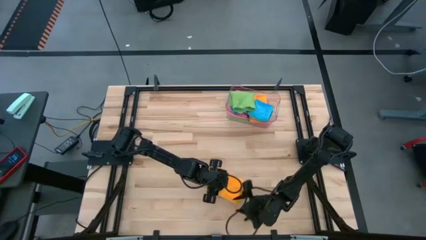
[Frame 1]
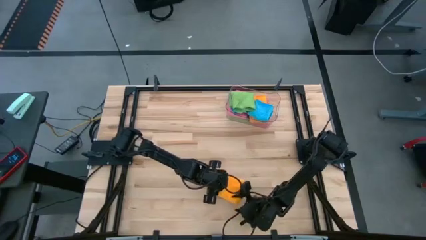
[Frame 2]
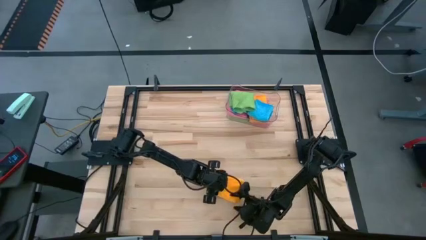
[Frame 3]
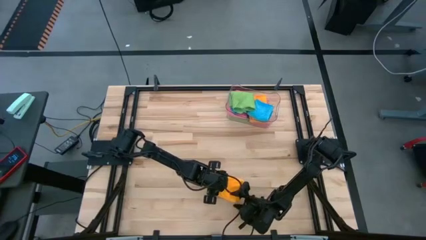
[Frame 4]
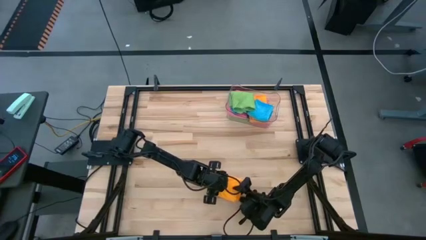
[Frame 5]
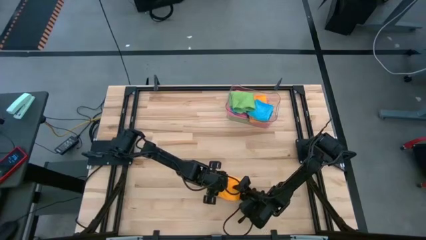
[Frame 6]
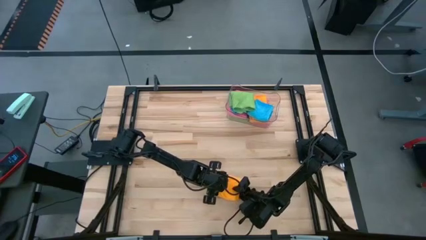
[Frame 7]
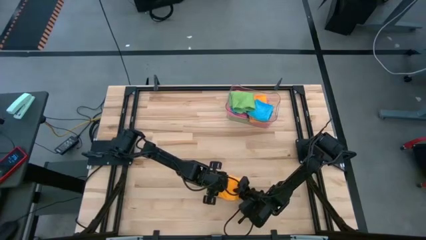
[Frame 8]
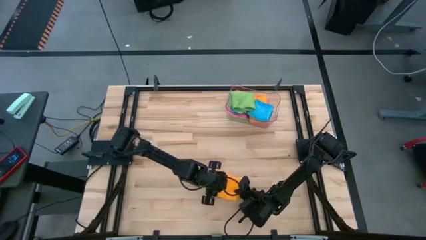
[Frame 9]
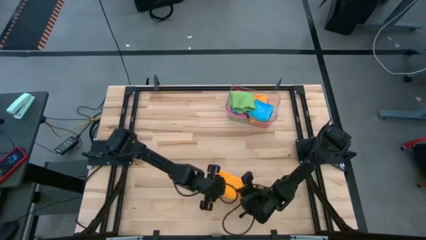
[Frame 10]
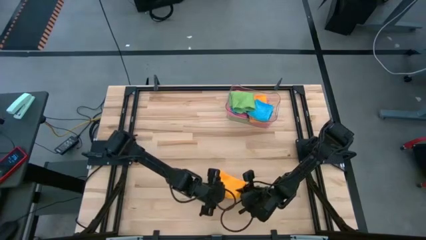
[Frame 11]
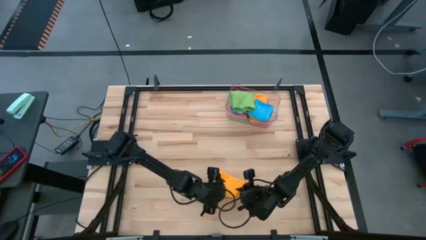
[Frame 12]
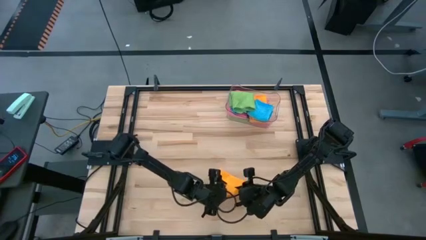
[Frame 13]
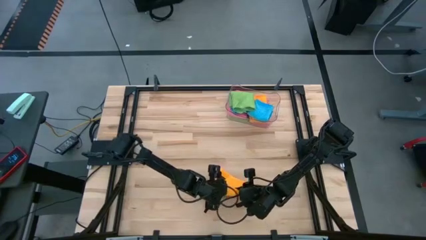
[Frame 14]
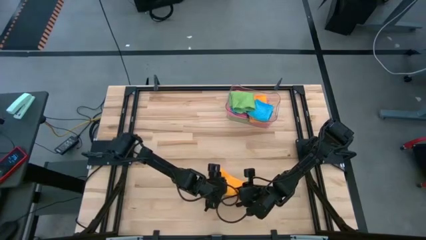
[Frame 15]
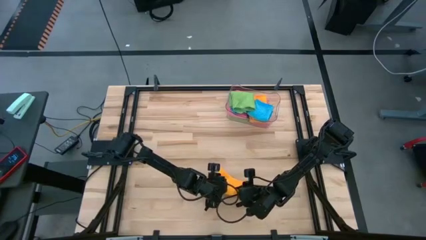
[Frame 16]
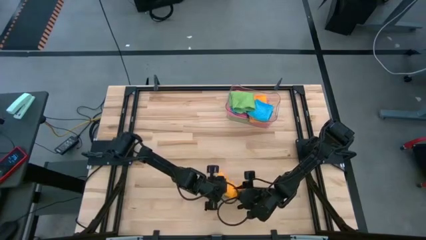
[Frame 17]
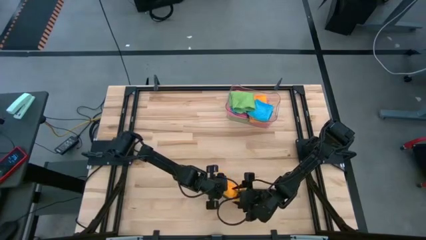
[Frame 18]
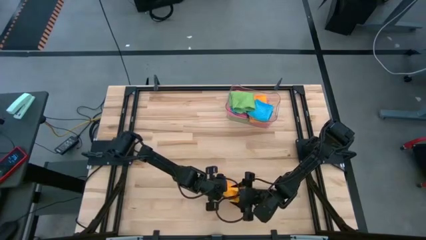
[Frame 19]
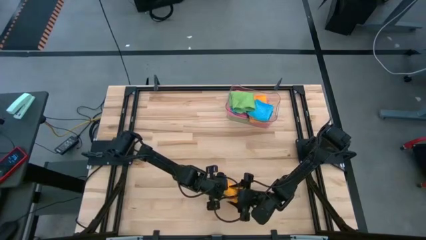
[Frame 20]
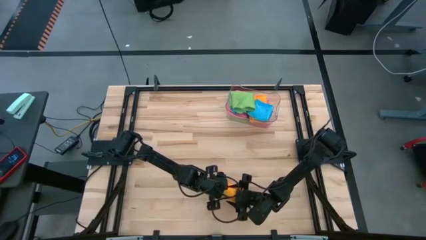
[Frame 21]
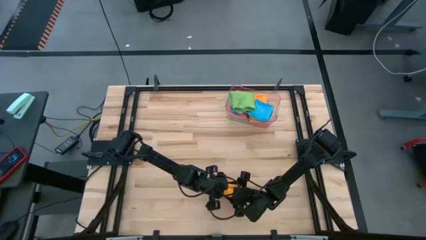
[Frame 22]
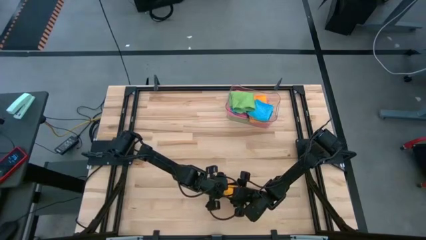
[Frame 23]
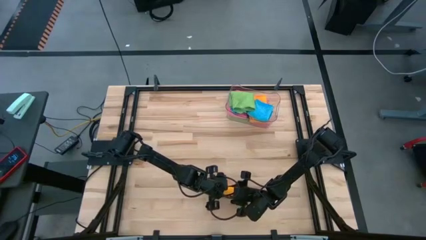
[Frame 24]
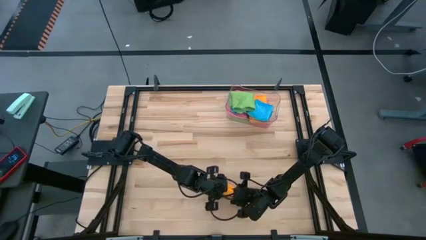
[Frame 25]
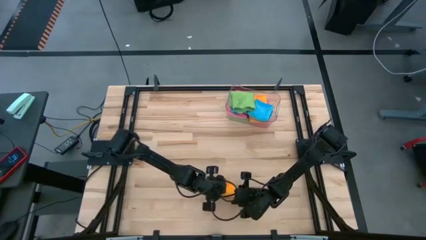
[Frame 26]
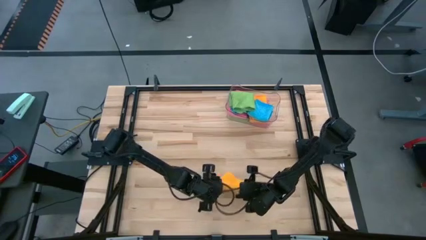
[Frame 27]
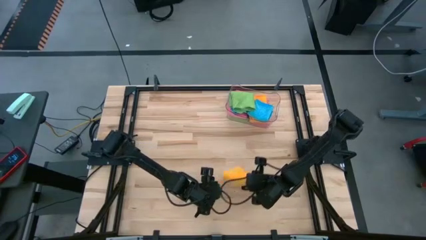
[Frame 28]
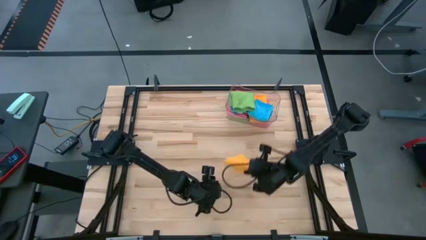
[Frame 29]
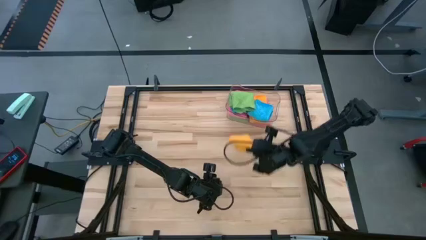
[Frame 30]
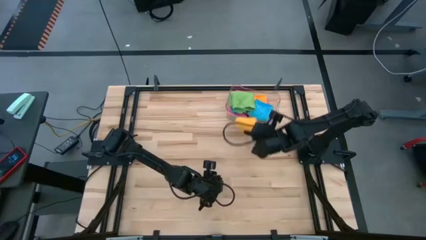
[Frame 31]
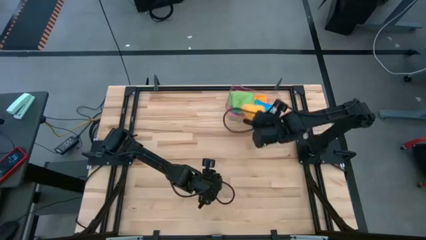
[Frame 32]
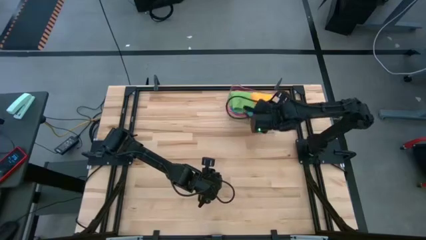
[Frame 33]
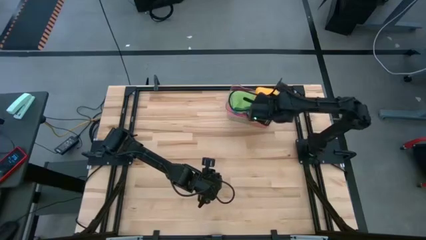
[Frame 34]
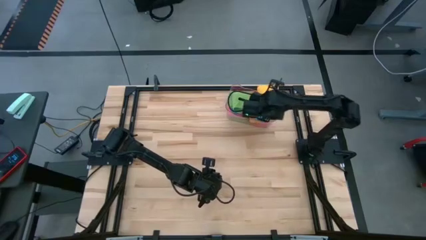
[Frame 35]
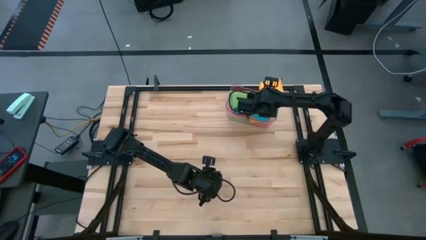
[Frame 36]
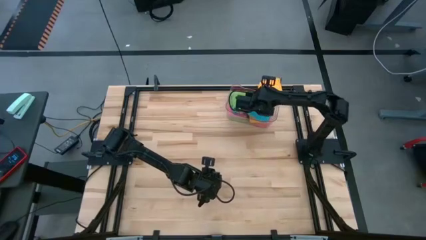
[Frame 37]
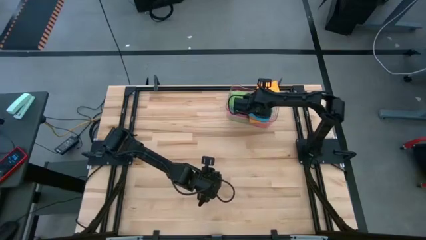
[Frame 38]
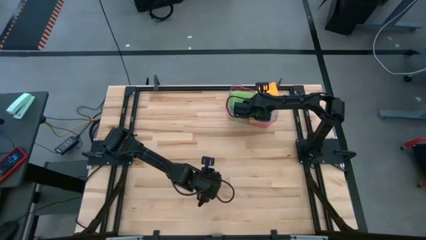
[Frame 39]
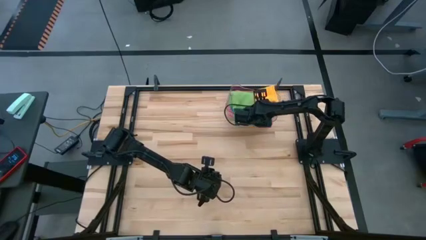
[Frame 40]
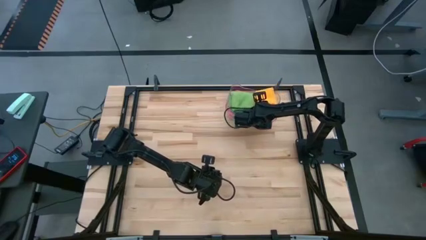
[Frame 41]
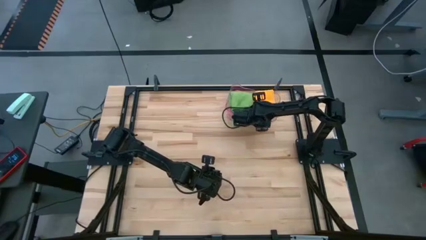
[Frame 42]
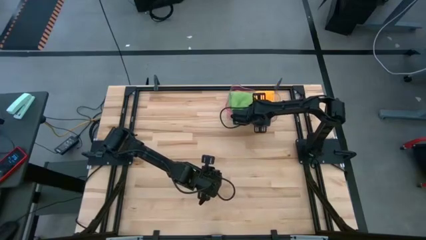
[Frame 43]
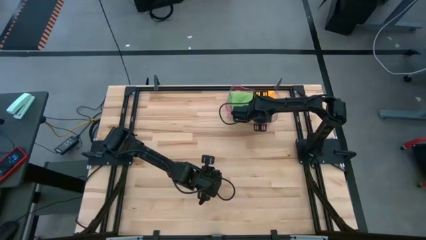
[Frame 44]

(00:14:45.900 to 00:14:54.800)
Task: Fold microfiber towels
Stack the yellow towel on top of the blue towel

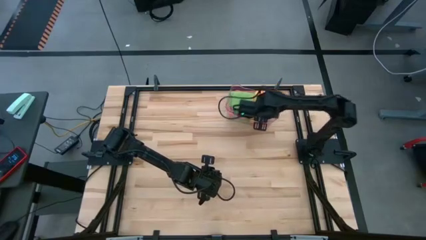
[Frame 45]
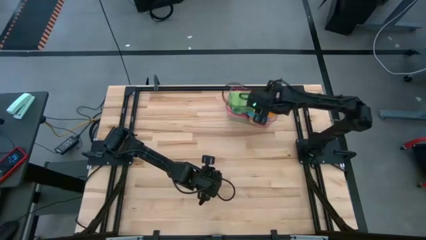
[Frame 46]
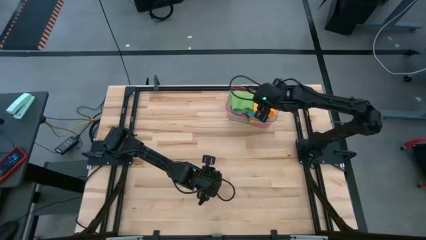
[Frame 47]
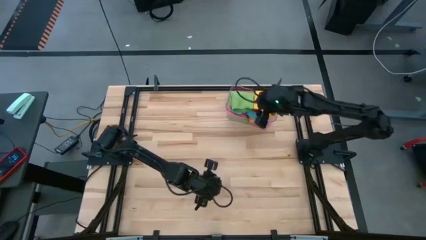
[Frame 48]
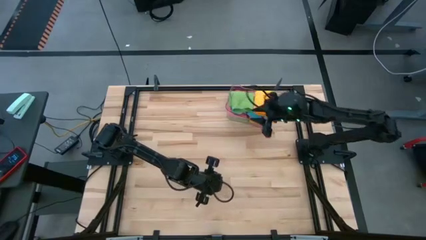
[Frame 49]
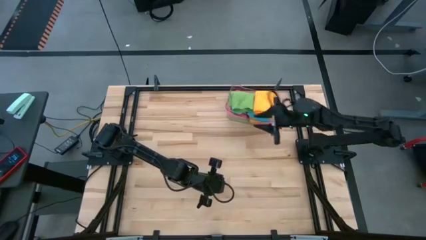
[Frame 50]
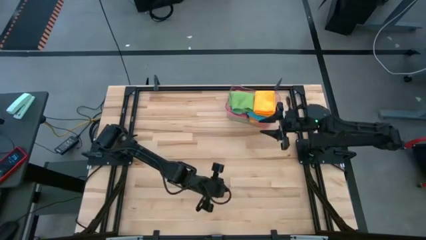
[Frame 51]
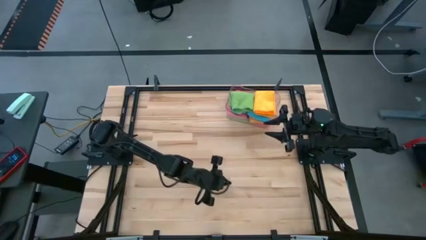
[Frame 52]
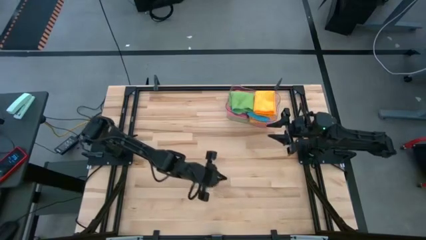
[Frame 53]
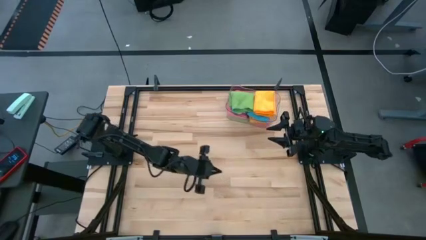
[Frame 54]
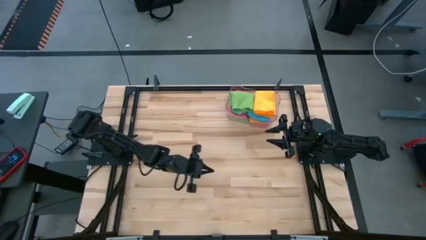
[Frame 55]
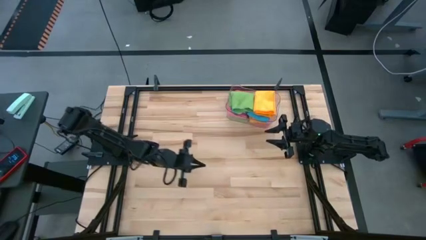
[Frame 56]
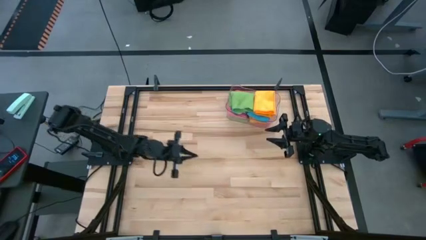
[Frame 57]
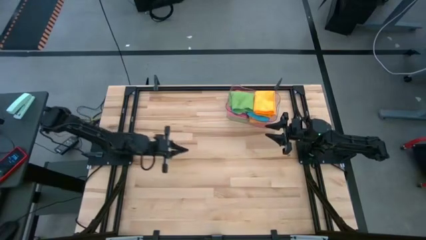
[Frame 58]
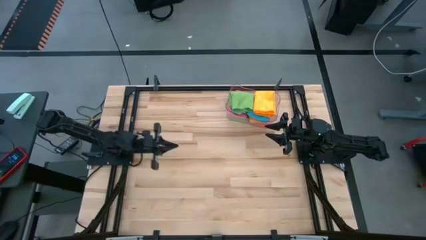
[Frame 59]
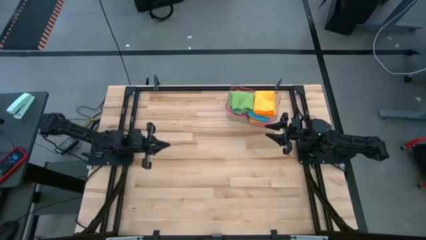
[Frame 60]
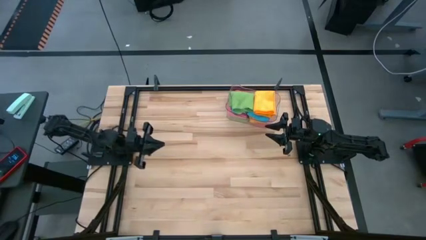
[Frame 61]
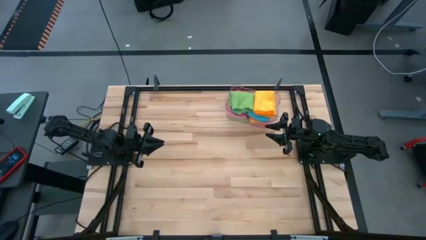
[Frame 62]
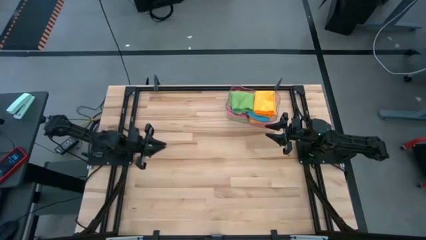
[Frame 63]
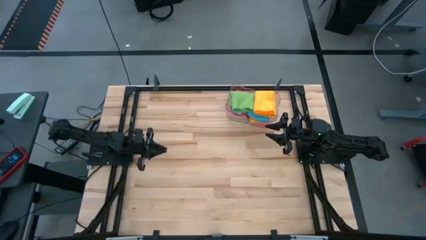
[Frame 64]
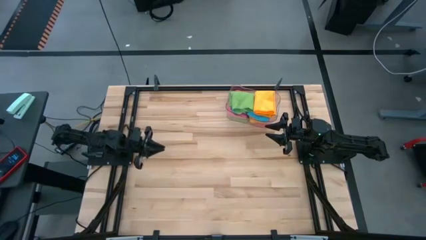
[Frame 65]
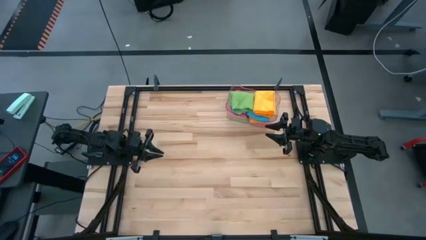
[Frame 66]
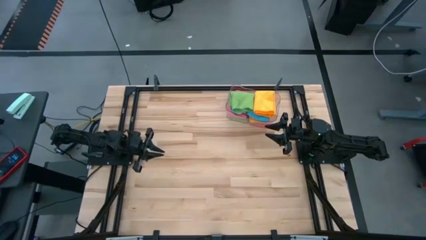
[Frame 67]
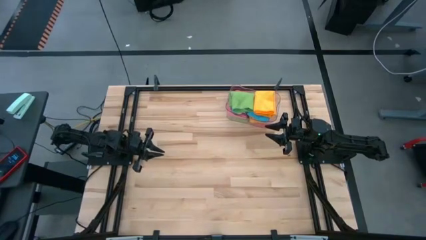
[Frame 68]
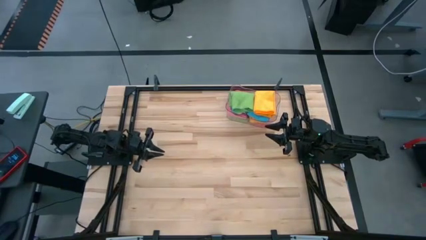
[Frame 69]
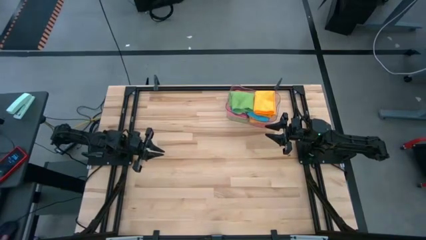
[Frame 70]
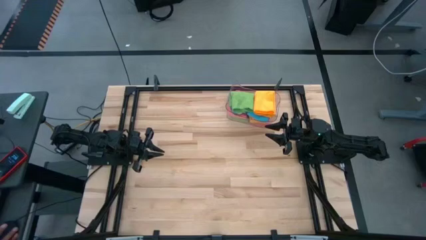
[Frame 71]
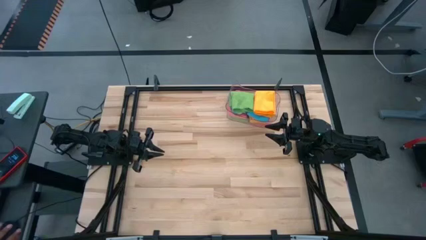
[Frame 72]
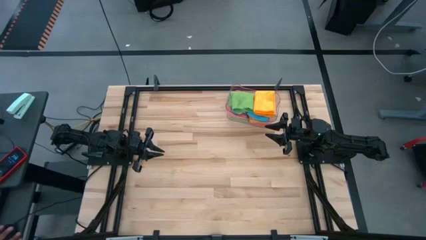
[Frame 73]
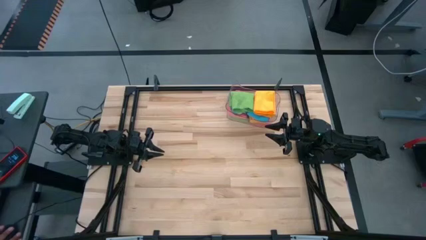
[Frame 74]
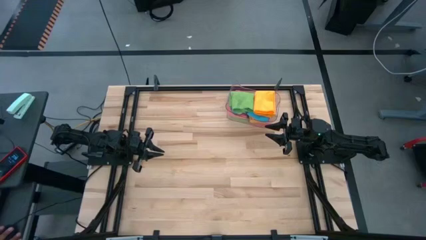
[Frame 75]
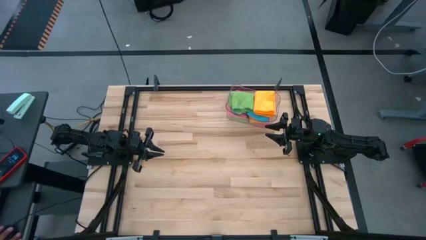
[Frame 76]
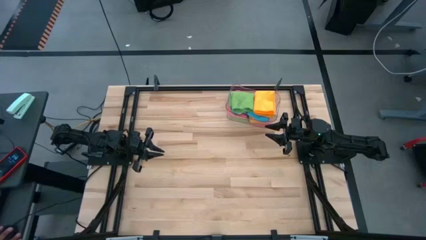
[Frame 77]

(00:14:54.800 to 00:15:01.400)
Return to Home Position
